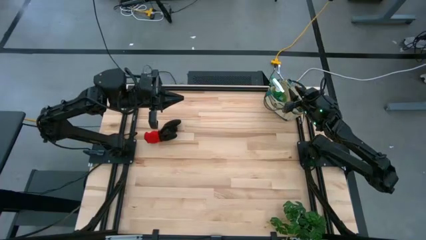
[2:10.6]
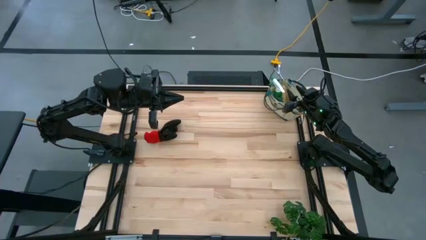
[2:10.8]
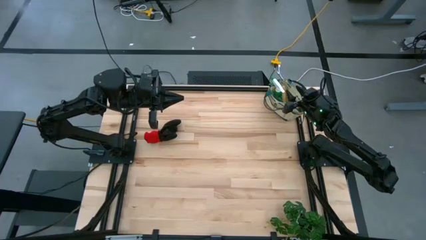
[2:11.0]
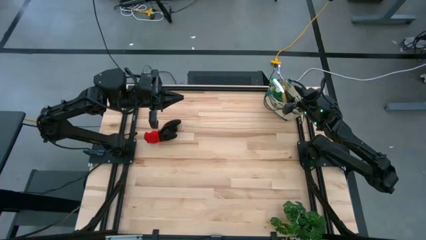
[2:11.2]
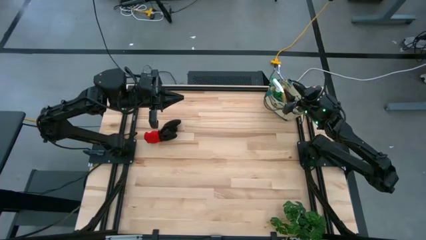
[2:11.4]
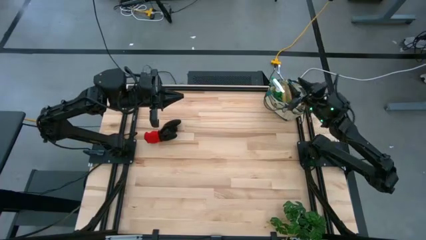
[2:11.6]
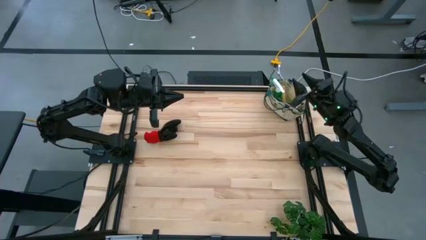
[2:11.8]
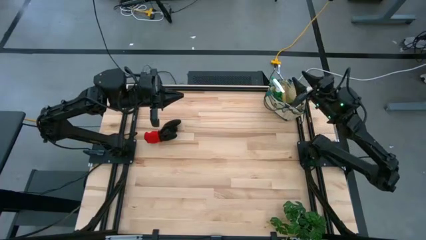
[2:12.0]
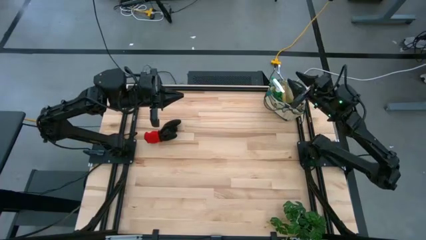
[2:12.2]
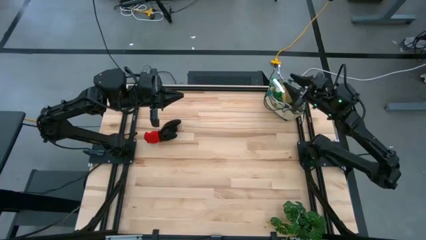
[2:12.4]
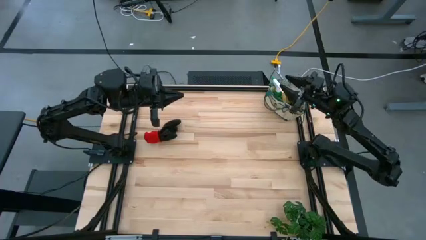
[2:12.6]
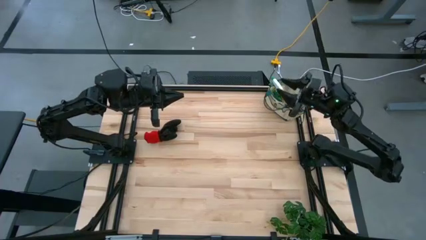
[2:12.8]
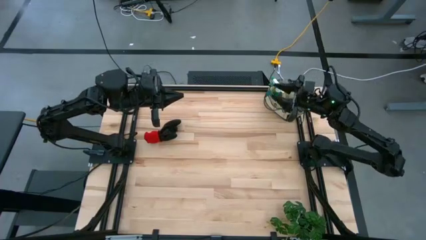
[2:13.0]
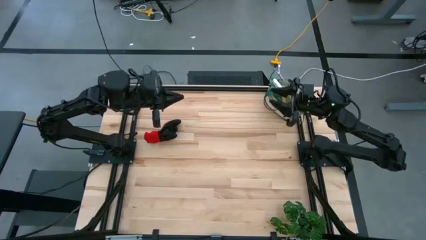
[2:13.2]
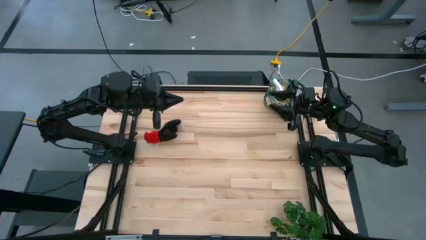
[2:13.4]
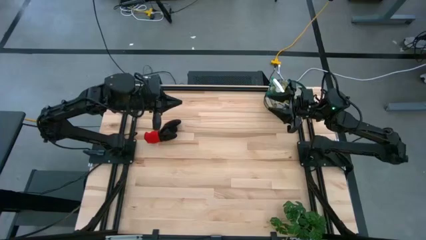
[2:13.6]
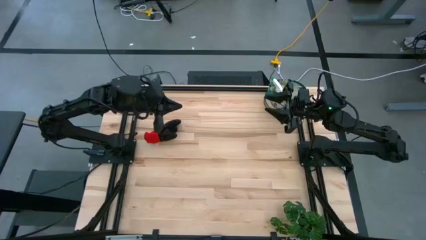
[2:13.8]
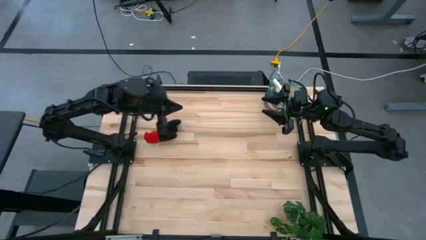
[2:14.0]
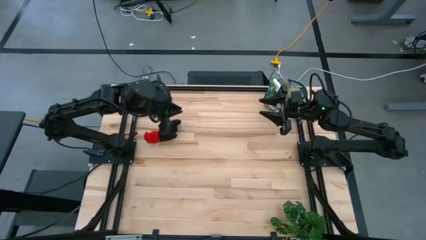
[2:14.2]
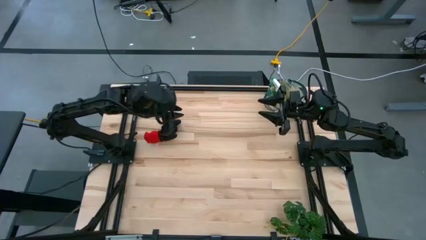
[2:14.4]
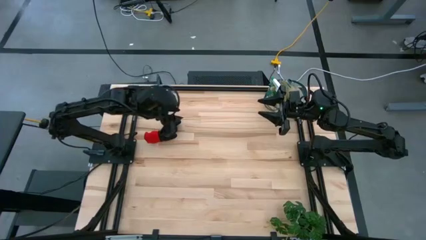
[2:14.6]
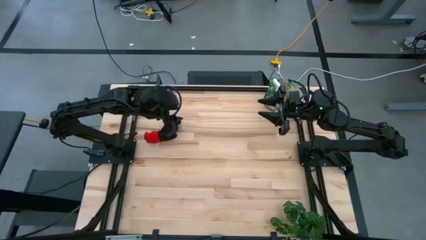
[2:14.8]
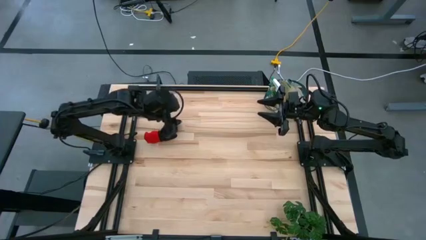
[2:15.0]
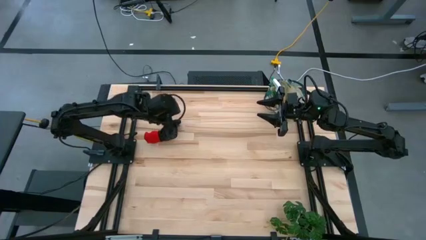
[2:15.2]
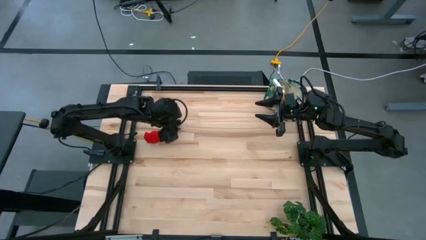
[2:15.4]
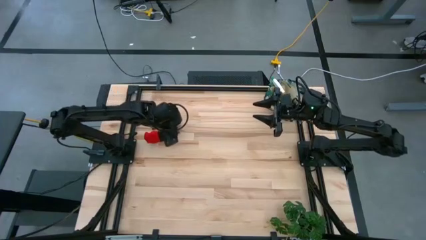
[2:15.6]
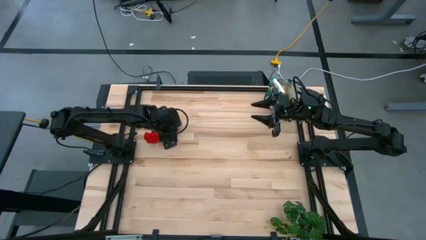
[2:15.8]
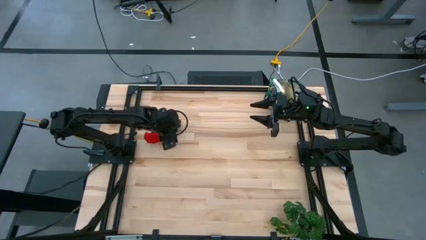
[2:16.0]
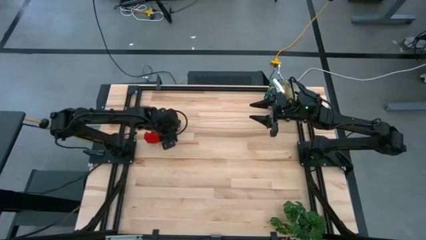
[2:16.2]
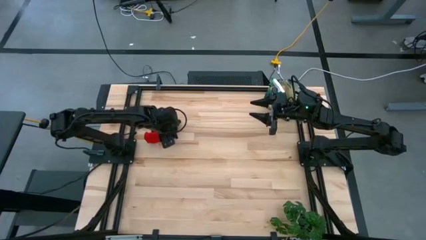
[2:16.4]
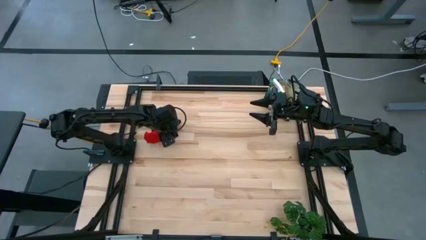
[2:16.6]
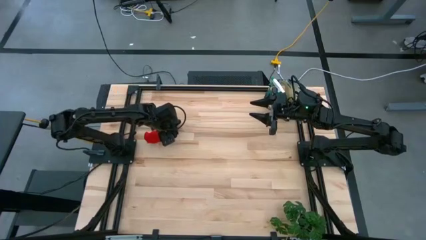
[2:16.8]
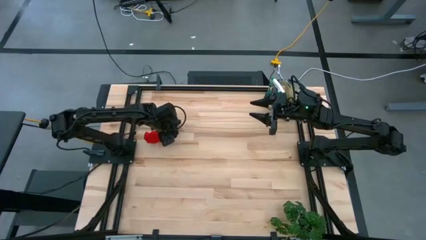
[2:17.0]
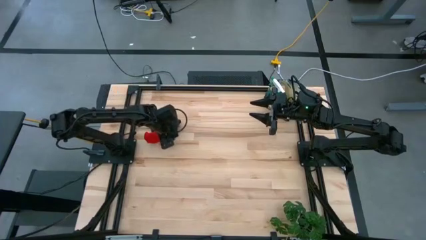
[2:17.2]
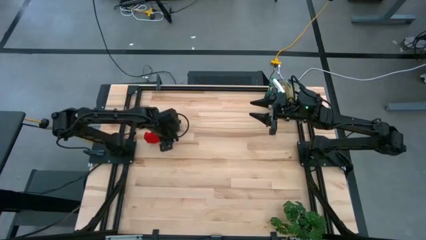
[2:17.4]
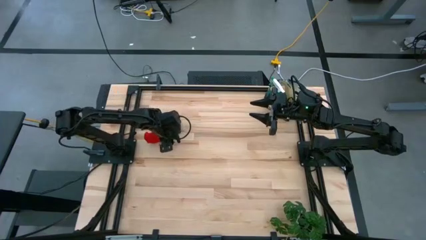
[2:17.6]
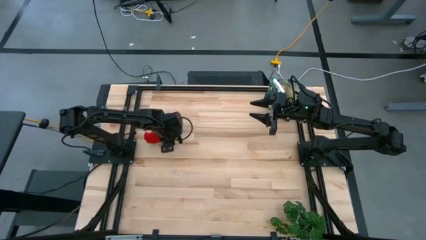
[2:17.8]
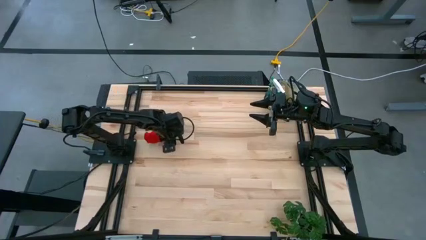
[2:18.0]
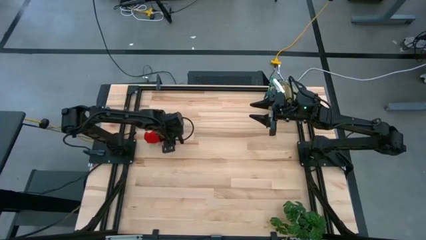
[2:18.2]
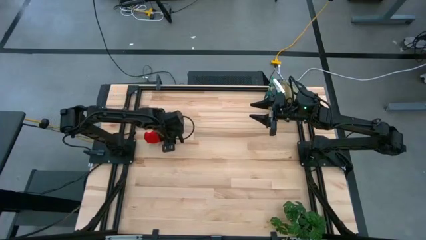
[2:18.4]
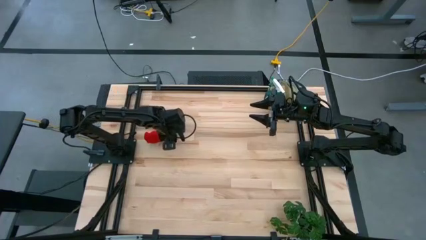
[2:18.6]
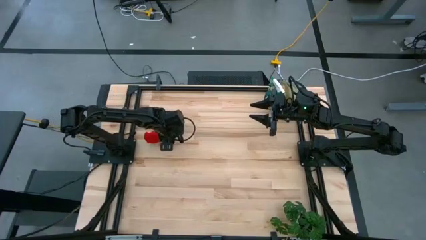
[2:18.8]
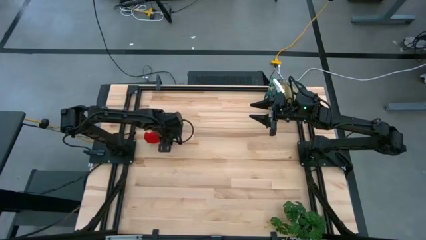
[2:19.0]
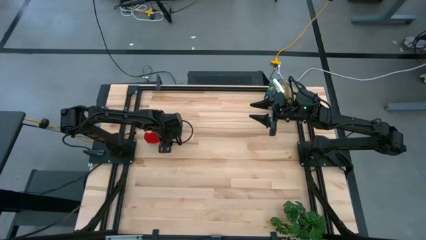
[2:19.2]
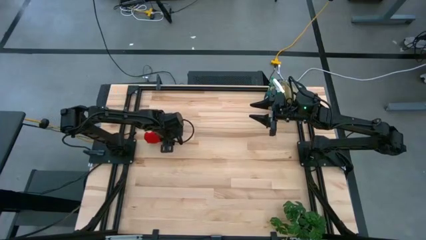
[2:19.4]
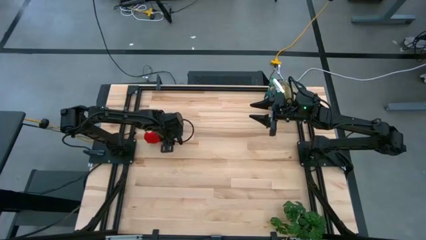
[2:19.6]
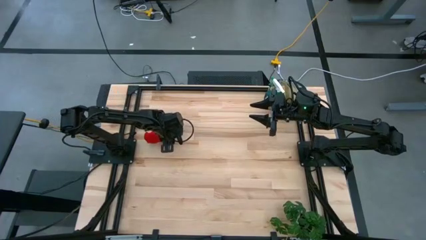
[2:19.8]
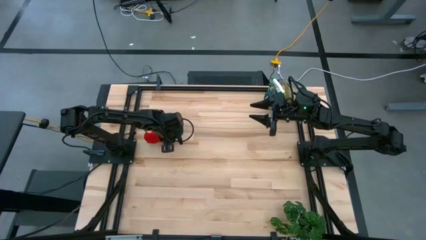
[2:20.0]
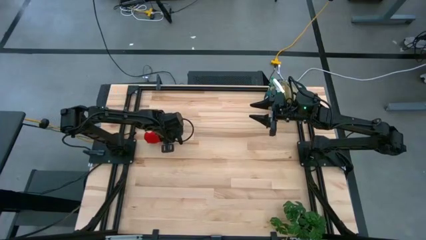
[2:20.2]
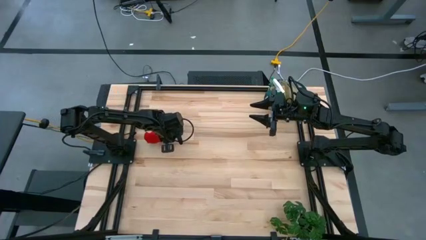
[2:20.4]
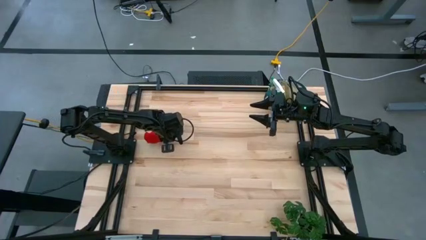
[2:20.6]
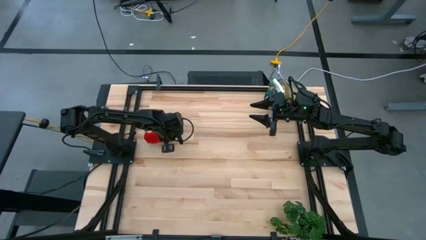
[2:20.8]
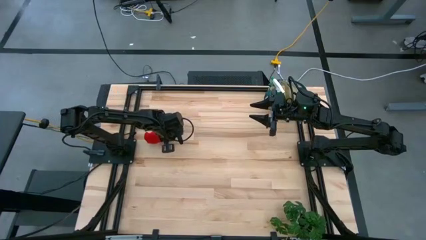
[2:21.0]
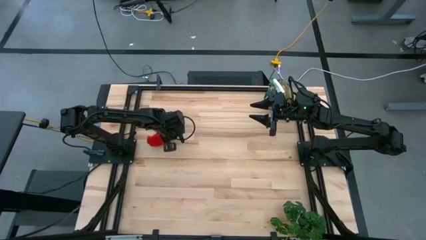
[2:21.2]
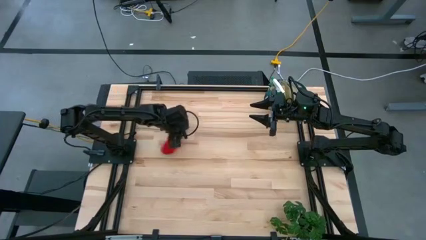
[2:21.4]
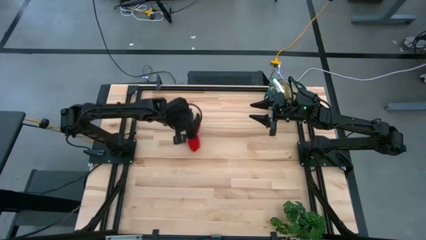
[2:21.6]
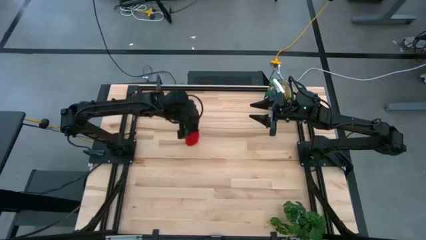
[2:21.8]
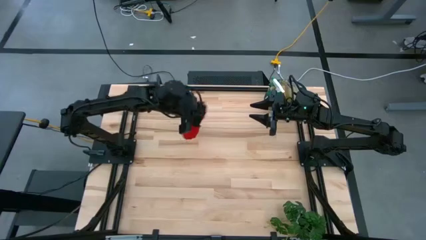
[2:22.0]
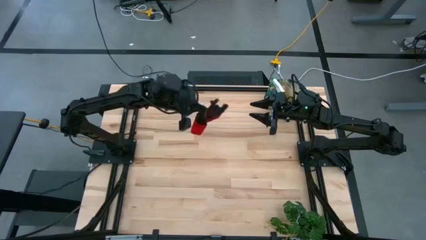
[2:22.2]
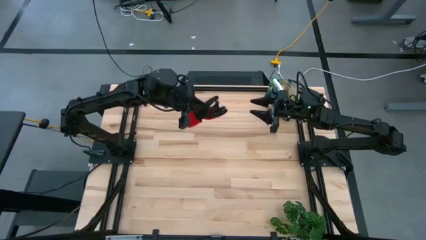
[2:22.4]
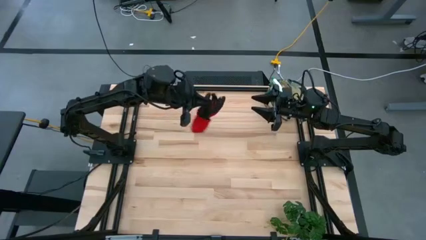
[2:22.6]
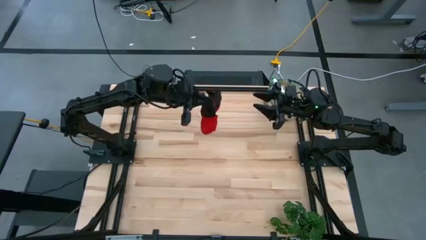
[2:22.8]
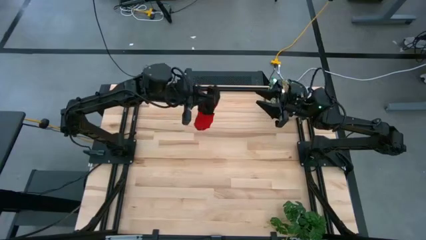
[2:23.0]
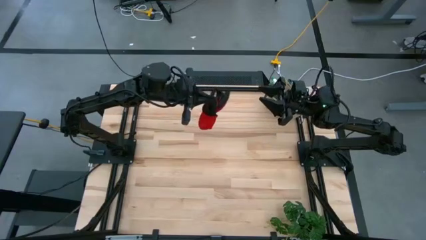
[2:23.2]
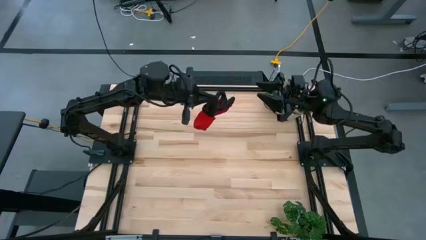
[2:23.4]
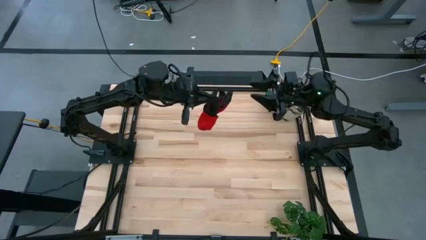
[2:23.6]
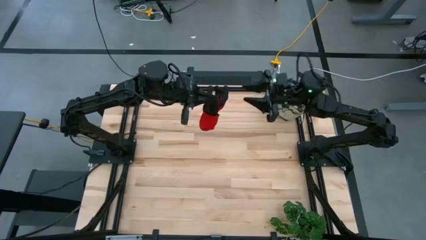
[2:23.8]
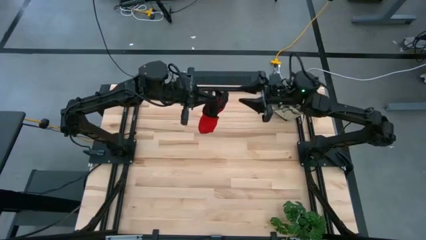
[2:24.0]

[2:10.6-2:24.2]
Task: Pick & Place Garden tools in Gardening bag
Put the pair of gloves into the gardening bag
